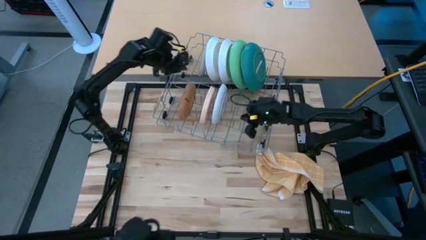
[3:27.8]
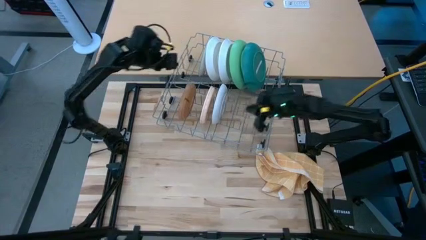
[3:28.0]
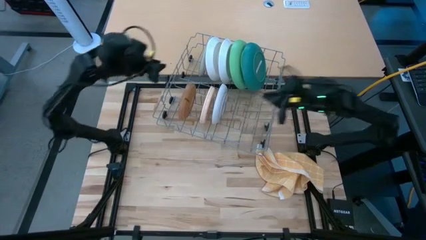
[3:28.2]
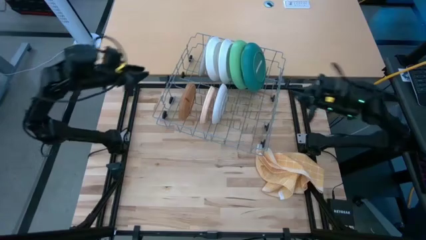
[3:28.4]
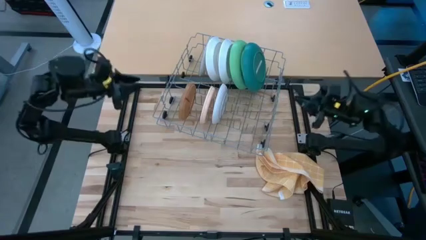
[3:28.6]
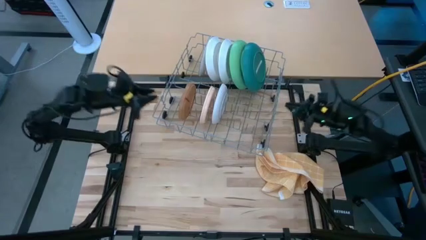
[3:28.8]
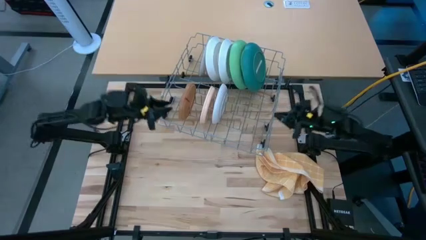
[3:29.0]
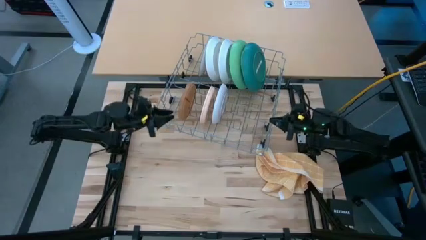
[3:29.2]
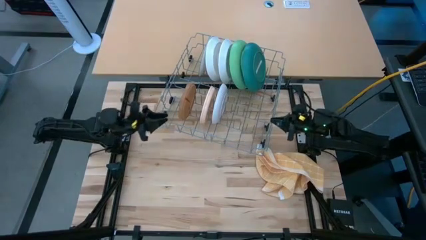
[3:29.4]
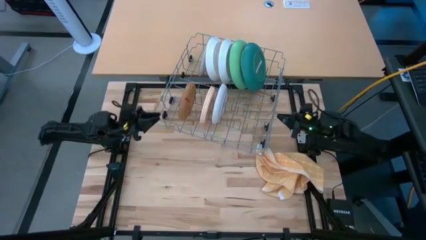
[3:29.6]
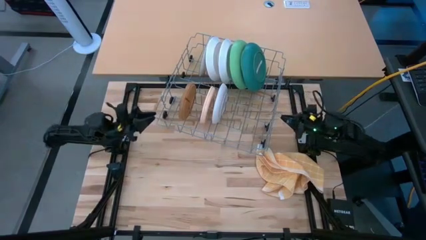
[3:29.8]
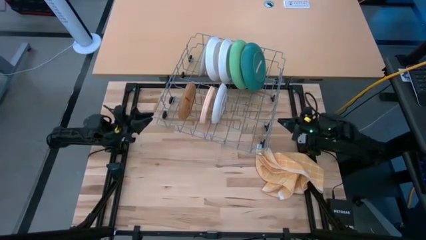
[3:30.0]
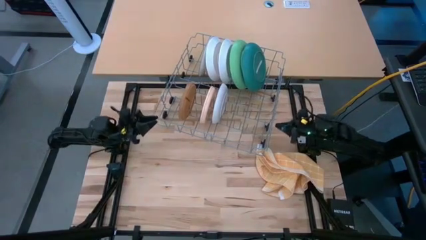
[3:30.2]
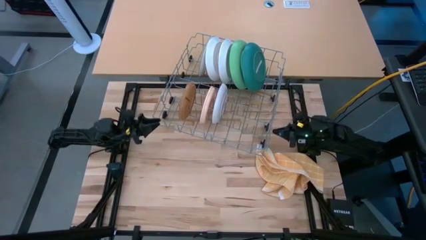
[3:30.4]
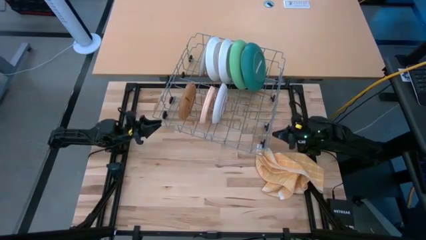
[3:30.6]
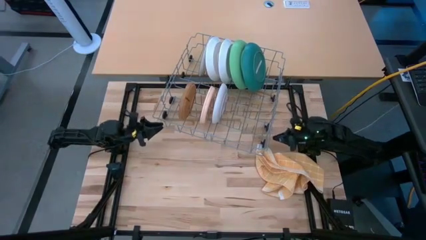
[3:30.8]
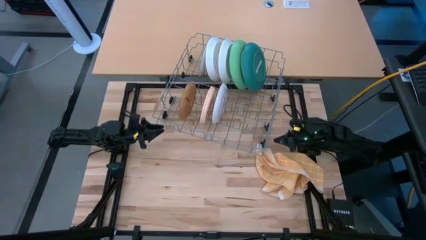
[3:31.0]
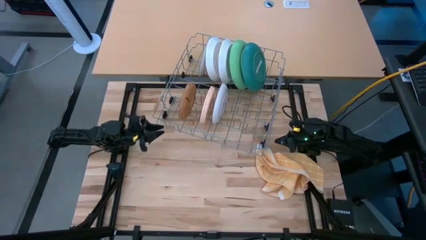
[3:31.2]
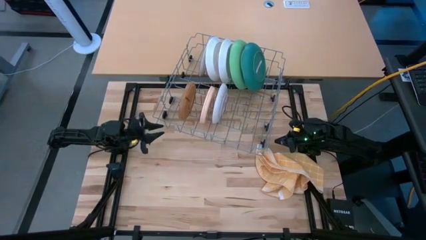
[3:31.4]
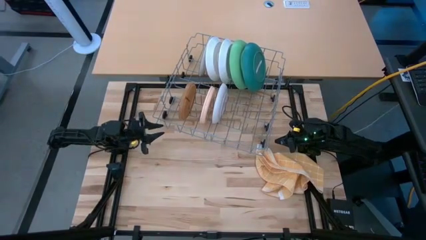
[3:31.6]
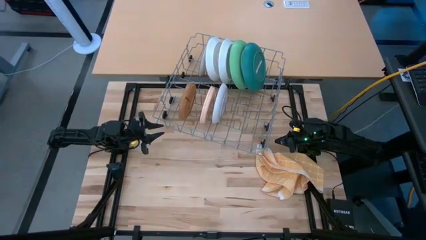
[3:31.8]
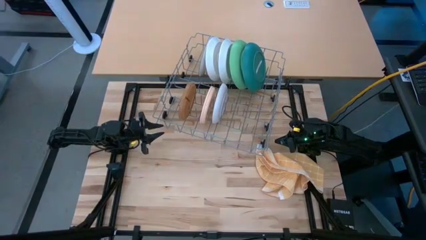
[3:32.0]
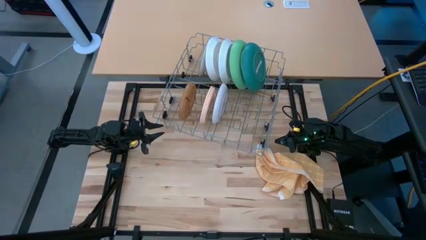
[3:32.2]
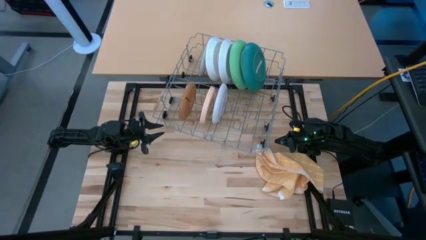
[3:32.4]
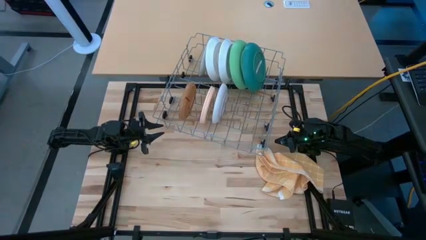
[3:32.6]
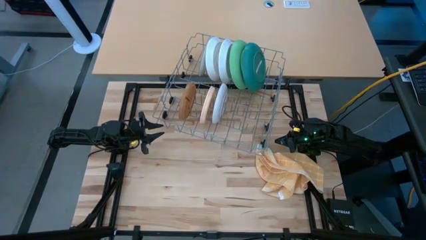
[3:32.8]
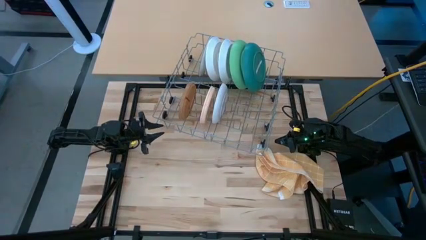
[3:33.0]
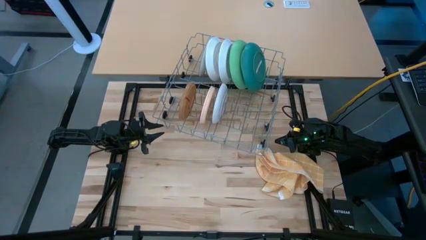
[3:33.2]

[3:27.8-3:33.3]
Task: Sort dishes
Return to Home Position

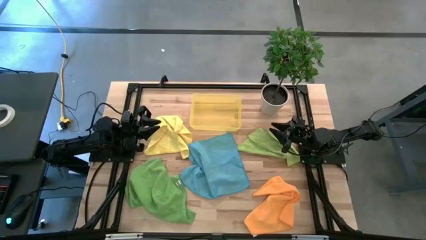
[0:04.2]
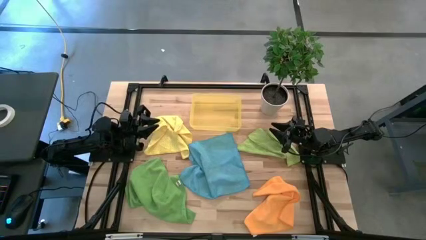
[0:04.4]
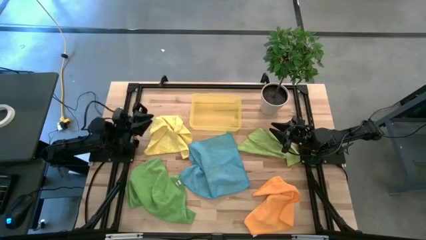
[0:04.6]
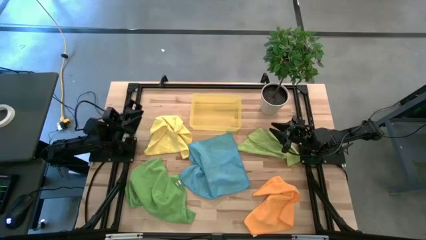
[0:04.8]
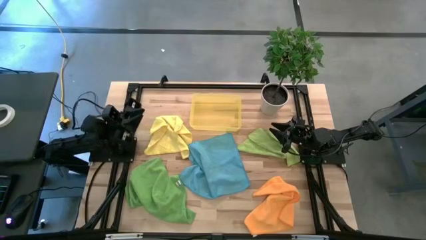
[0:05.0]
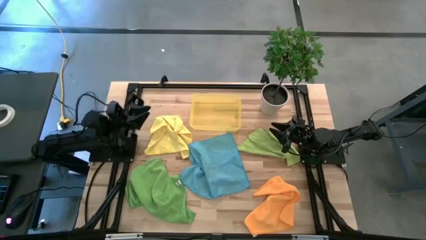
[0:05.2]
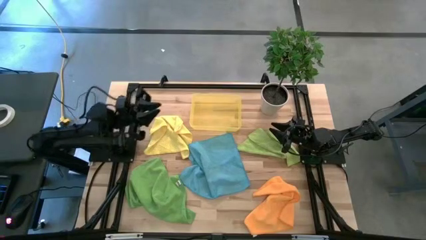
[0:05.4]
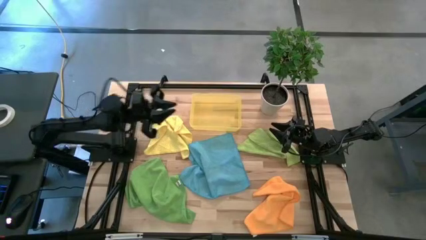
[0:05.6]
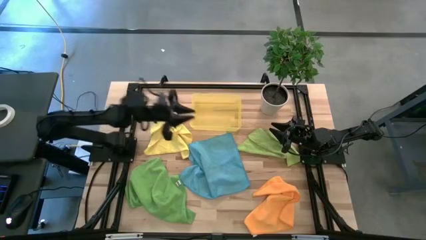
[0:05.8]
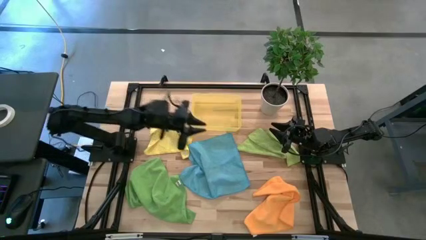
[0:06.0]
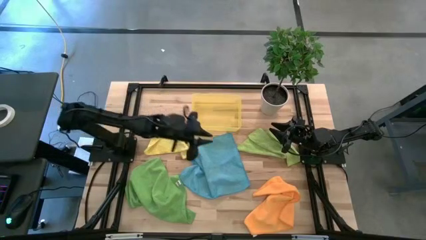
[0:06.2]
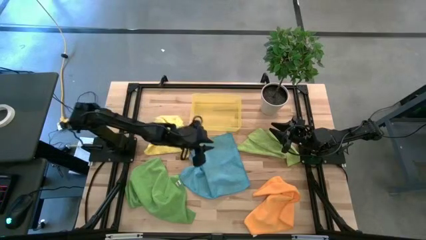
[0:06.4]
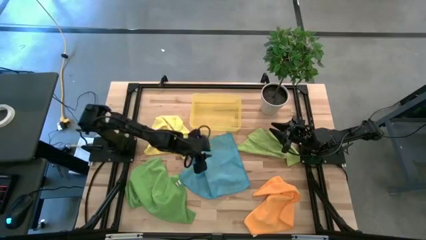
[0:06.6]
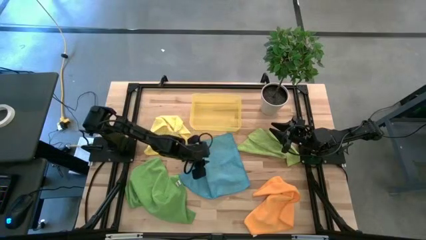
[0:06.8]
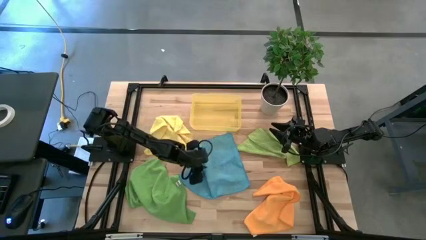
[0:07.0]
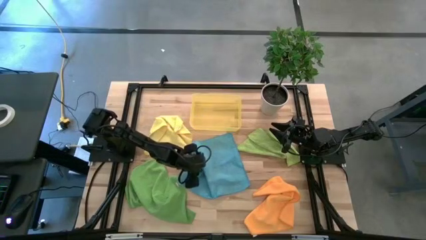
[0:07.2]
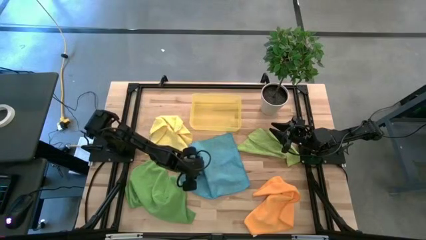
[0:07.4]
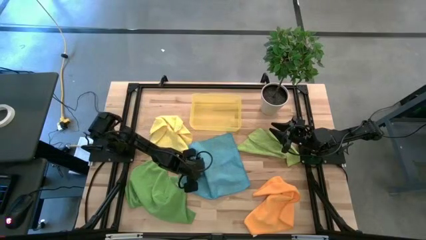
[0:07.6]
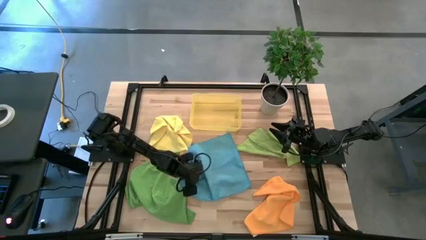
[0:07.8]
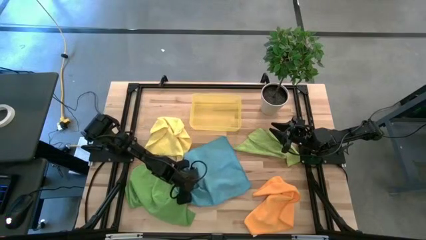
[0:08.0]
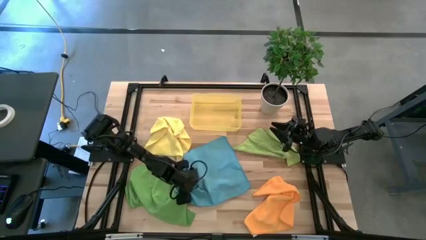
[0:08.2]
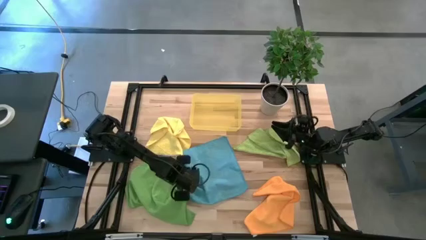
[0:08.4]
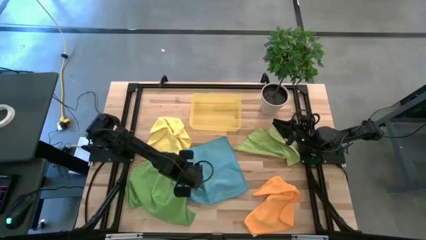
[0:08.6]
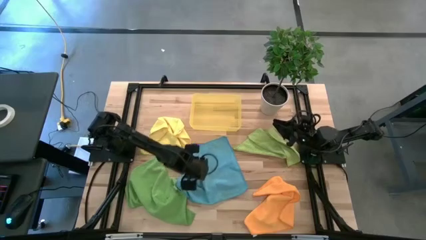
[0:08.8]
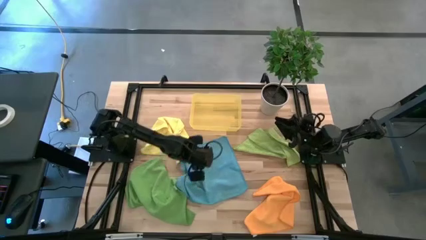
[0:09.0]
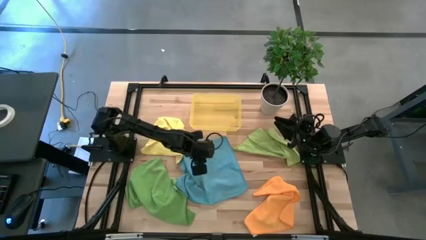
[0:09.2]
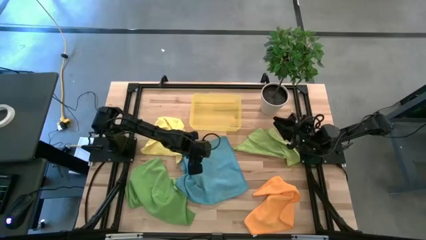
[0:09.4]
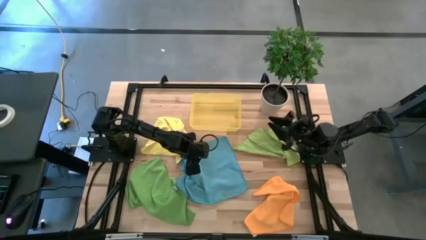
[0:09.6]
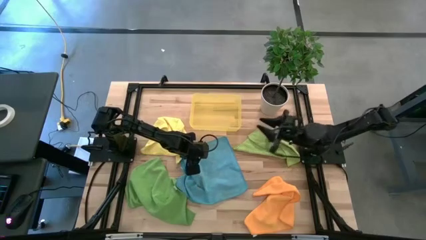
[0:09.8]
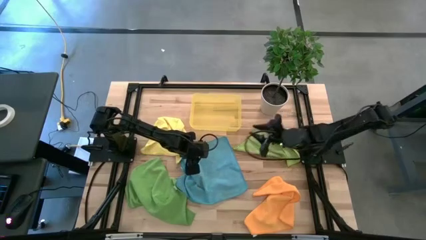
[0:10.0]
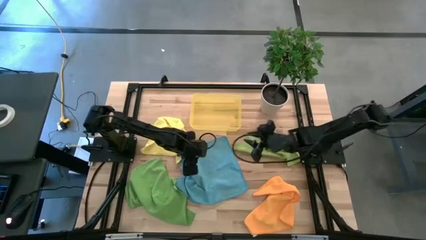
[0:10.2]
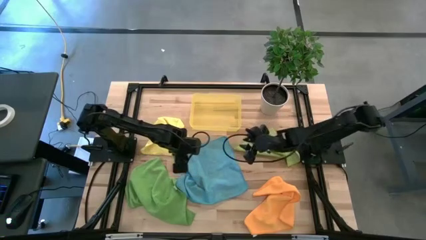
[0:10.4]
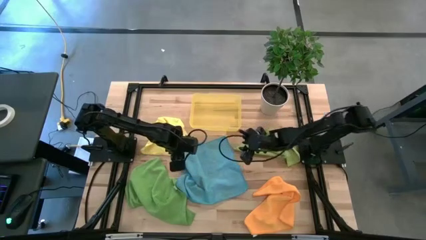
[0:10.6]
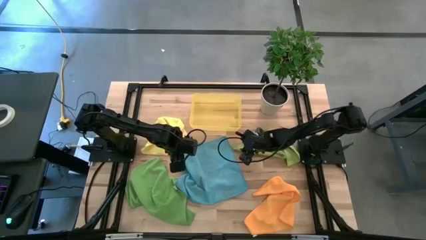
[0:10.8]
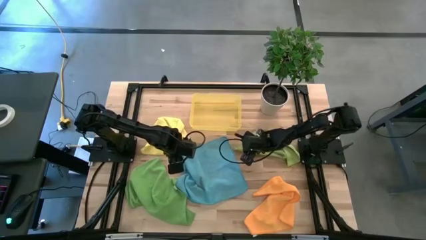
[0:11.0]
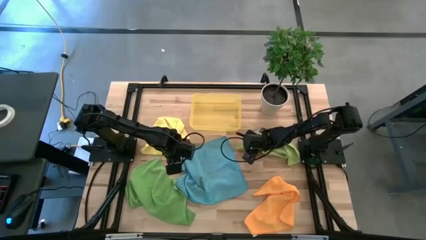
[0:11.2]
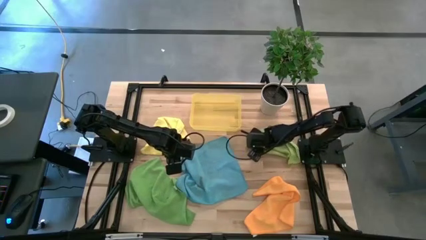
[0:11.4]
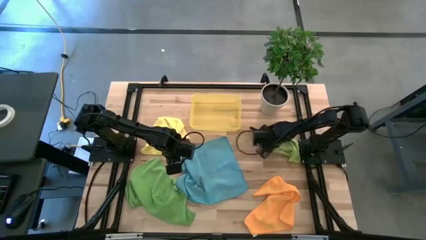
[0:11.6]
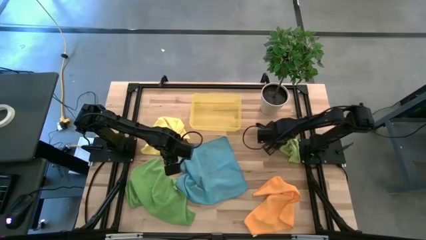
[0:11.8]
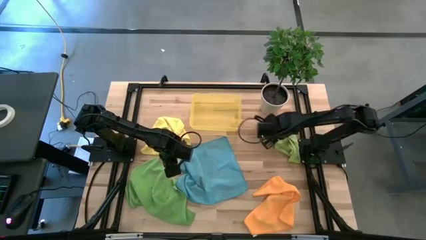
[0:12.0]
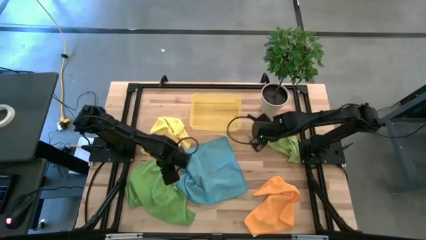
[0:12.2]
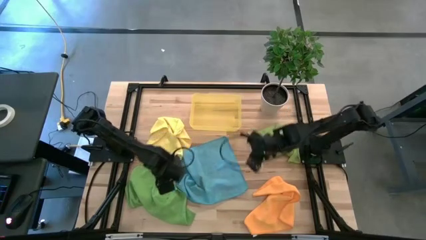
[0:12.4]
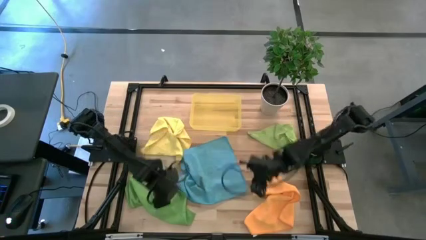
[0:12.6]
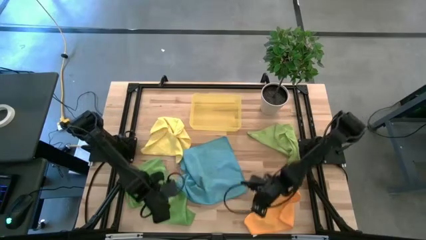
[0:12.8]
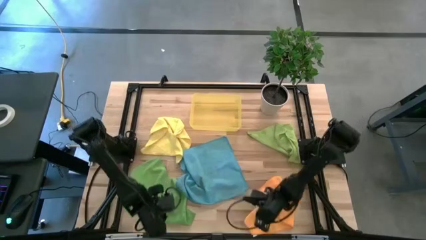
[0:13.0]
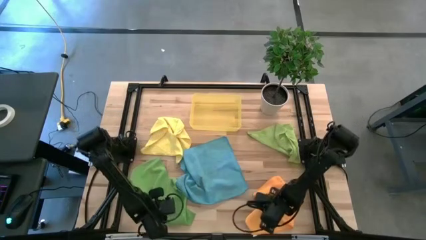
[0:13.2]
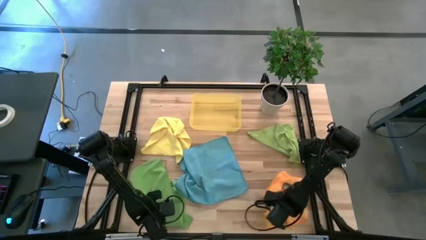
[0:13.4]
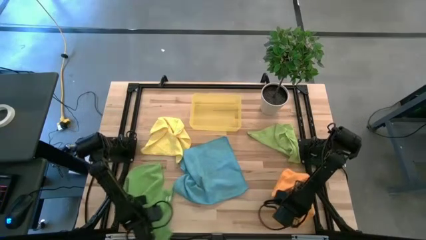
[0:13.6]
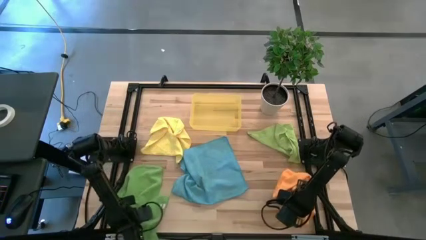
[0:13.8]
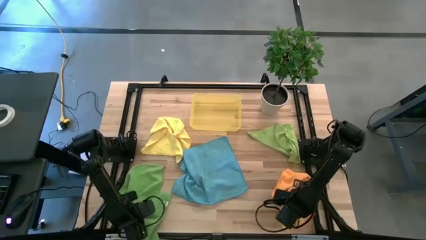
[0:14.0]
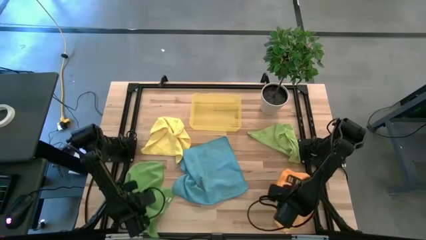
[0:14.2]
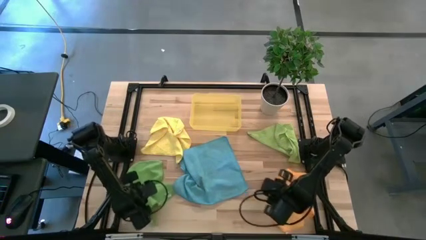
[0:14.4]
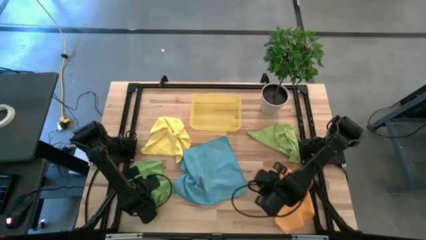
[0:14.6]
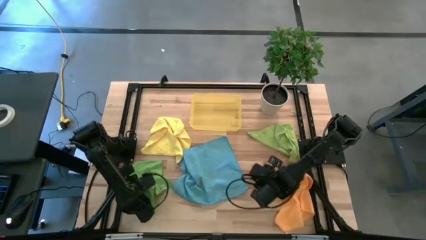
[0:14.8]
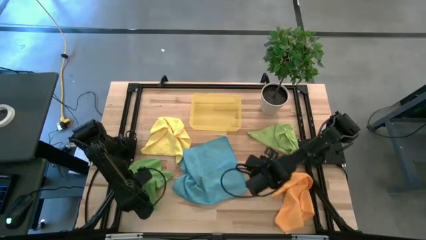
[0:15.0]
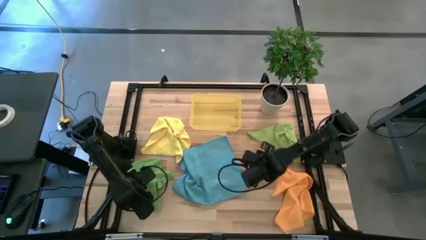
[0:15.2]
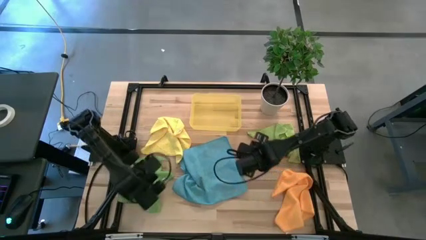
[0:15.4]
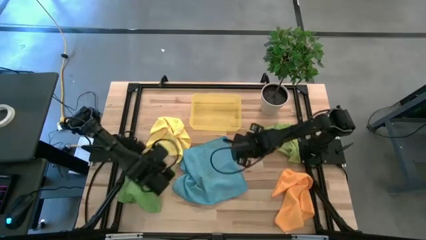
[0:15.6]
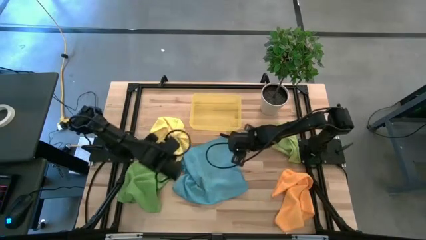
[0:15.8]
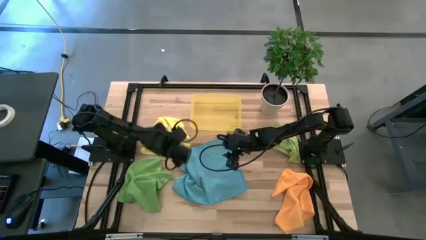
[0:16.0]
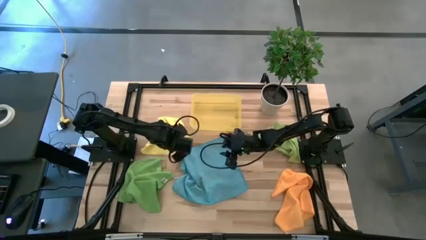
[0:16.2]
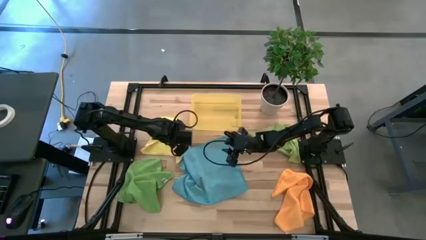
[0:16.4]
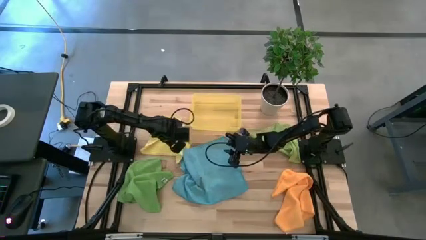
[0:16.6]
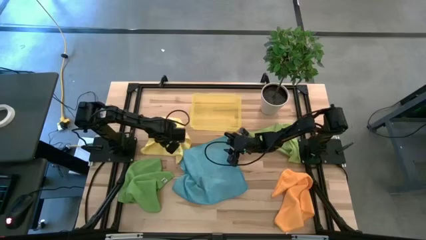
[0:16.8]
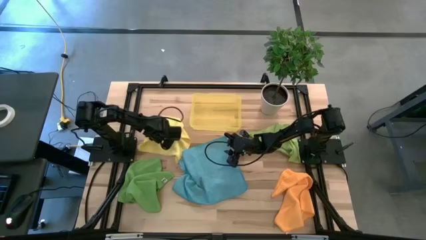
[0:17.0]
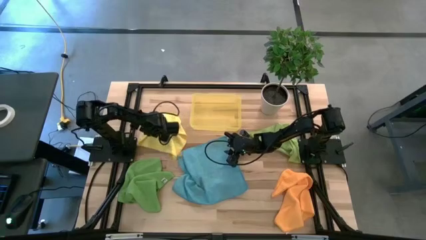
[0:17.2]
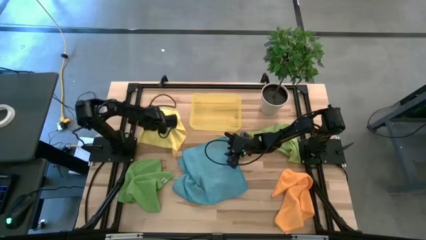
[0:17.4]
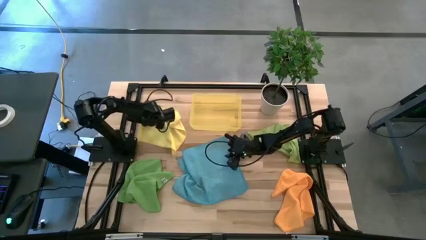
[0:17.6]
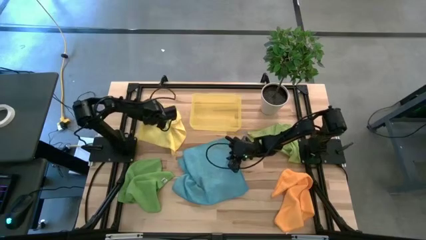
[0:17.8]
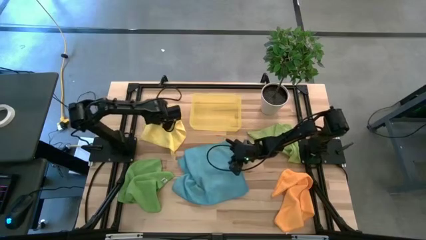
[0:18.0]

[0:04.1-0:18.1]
Task: Fold microfiber towels
Prepare the microfiber cloths
